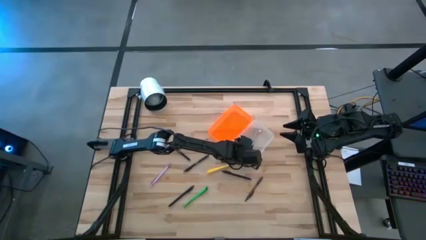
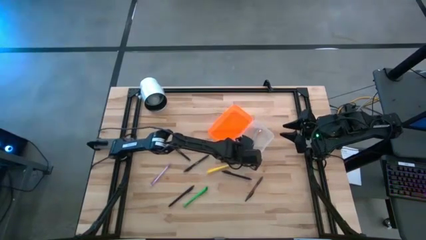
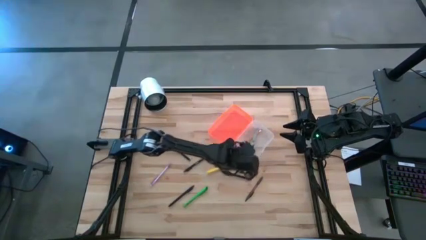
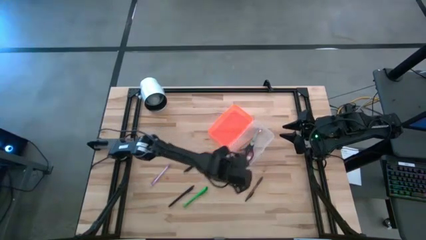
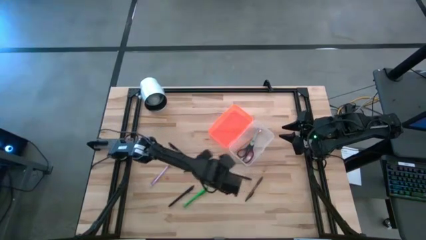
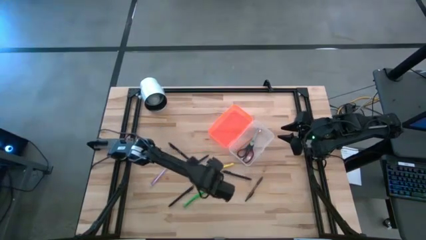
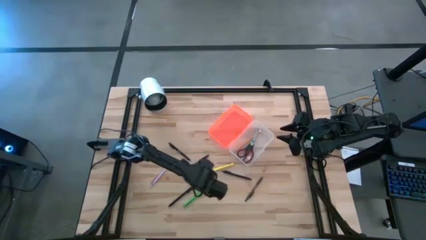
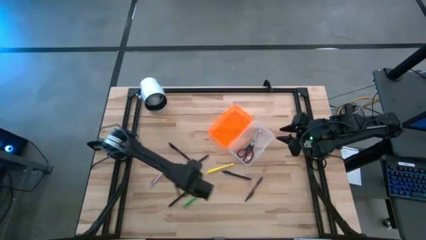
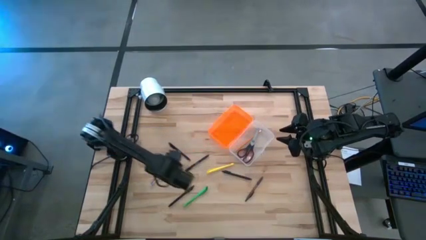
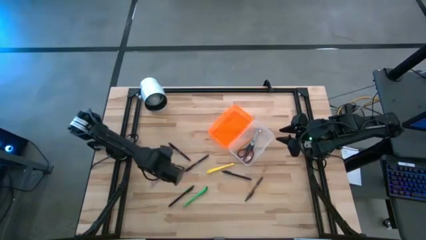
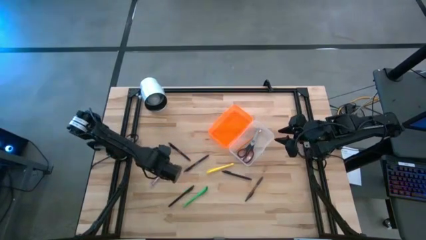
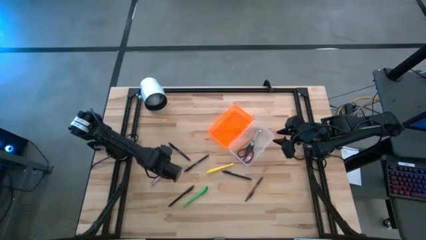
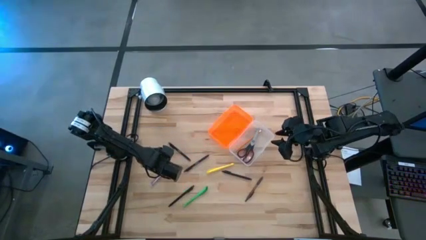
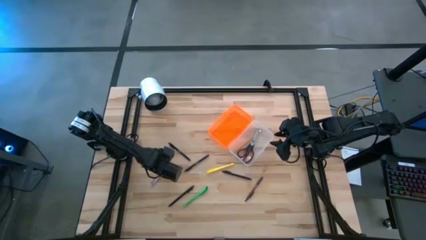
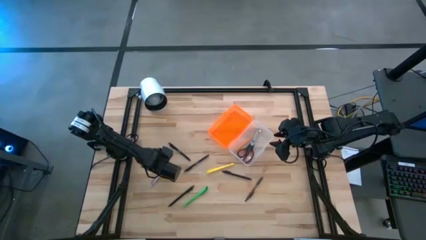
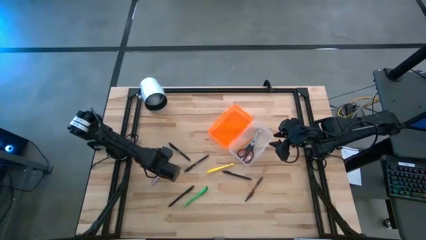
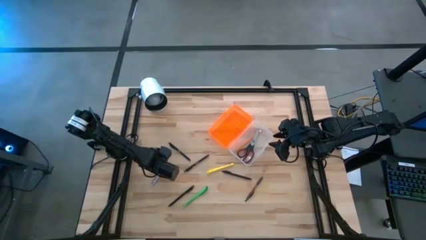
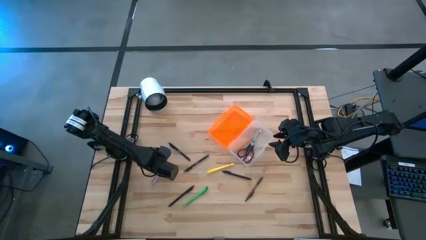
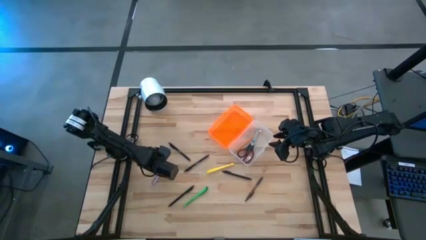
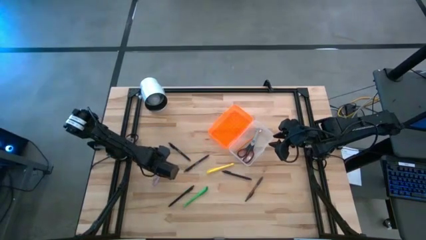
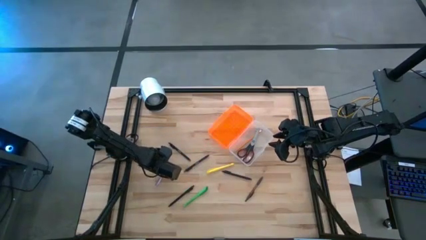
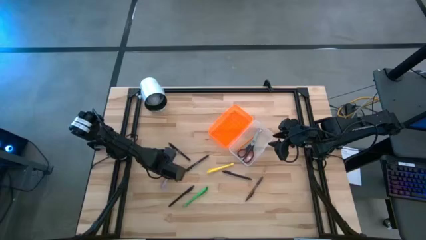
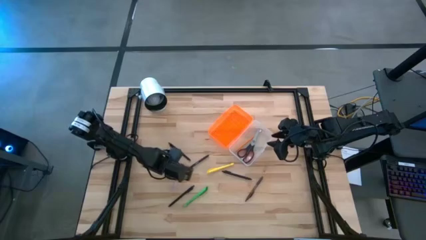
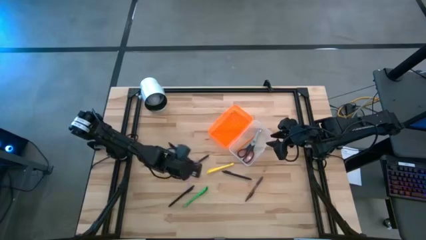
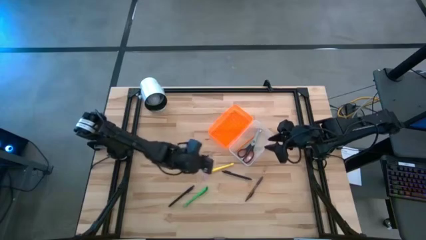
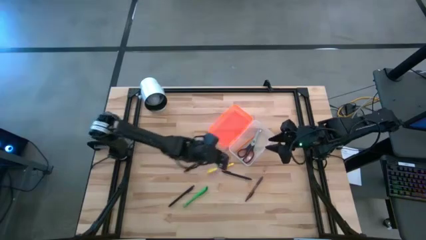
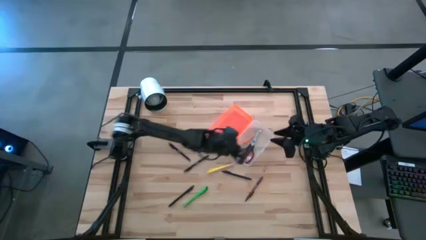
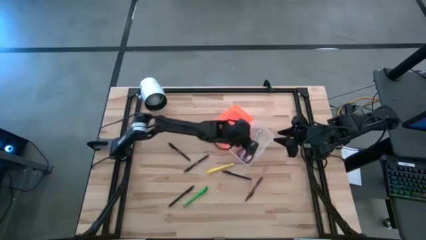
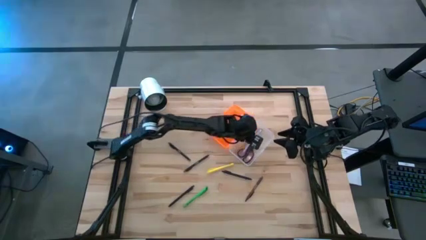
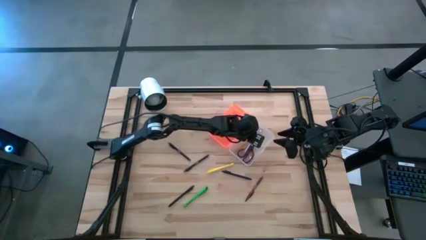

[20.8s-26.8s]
Task: Pick & place school supplies into a supply box
Put the purple pen into the orange supply box

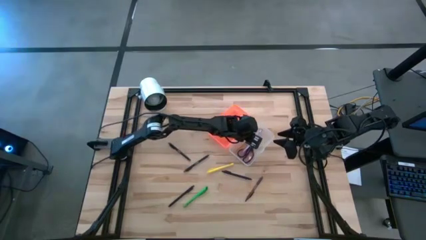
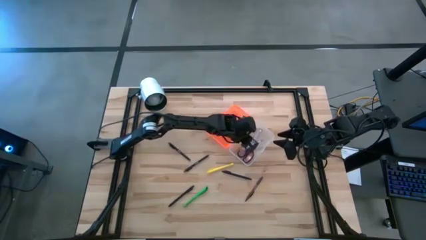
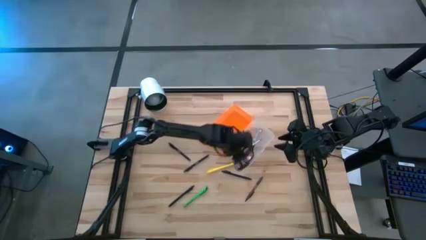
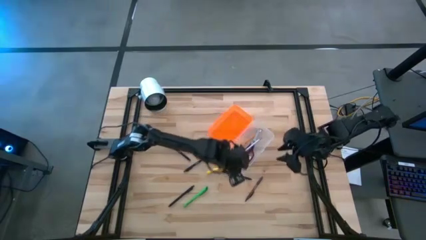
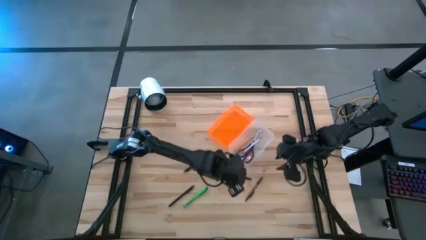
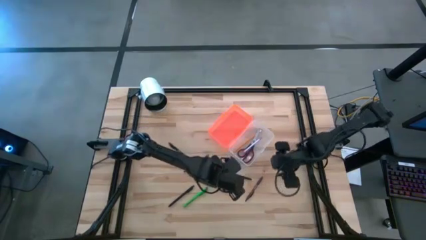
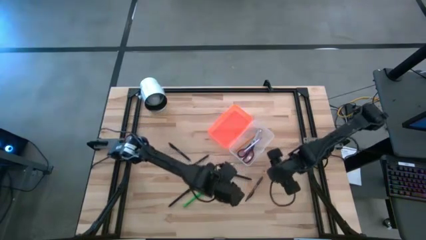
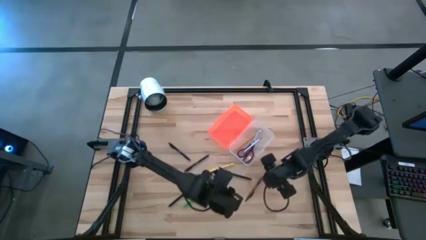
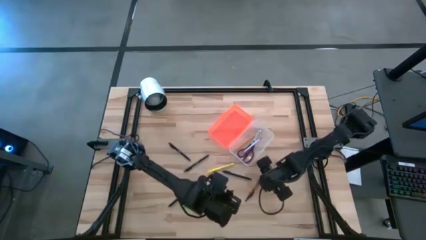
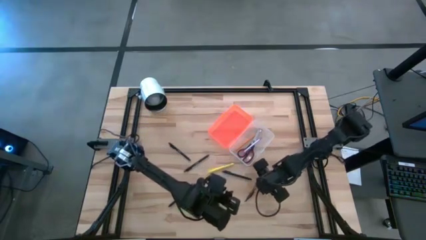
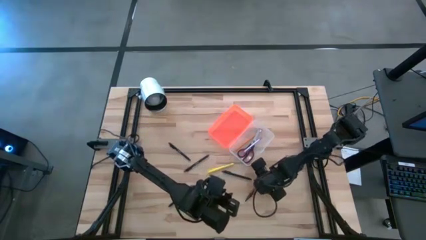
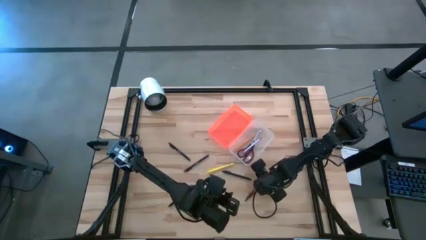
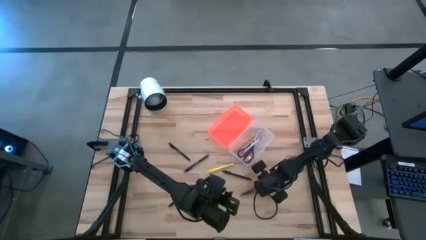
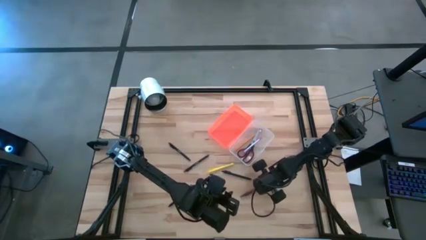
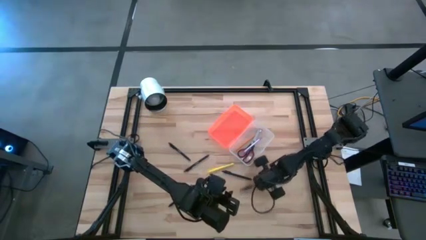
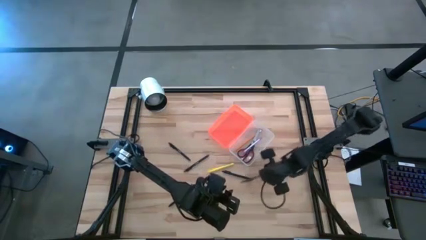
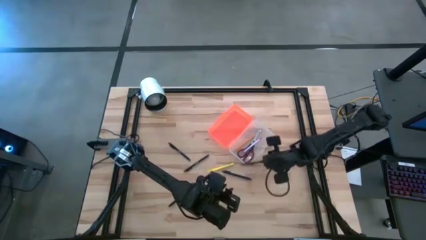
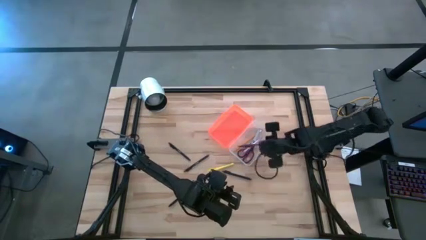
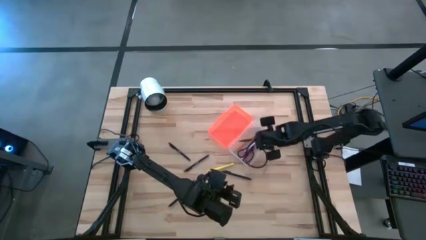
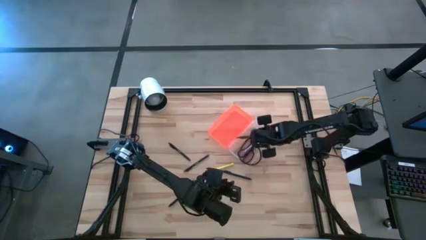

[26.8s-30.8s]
Put the brown pen into the orange supply box

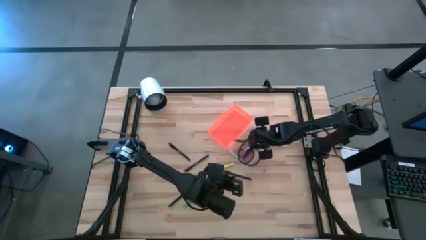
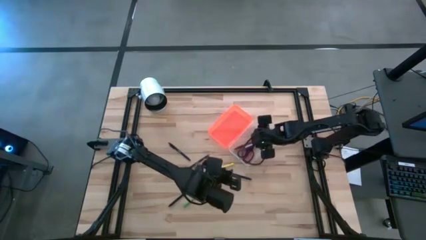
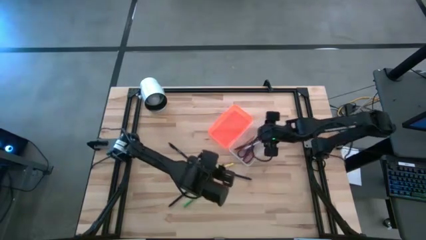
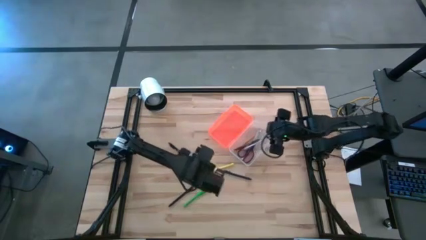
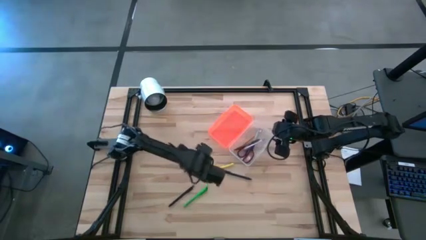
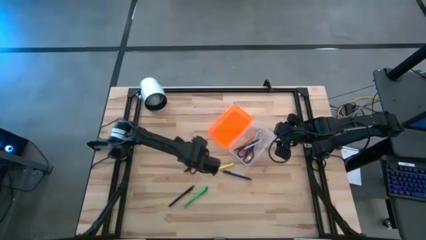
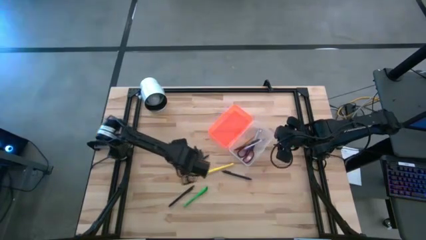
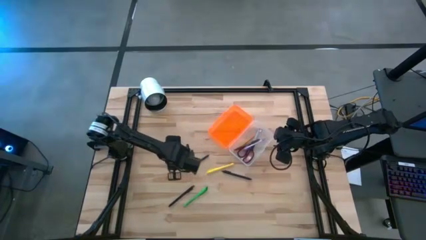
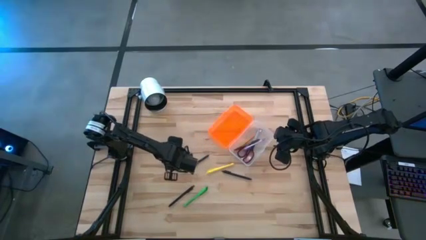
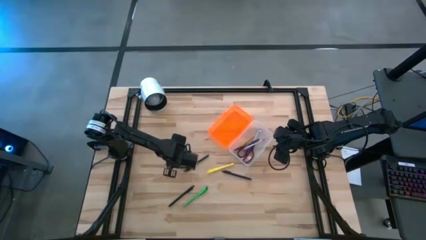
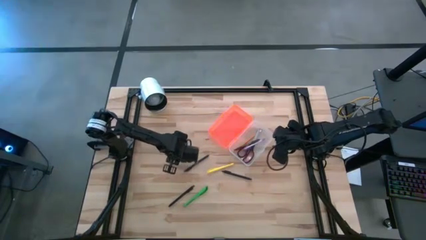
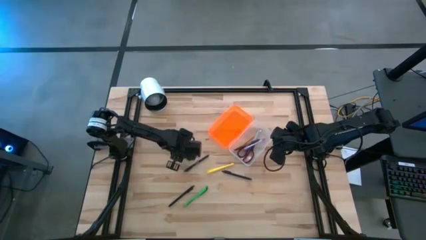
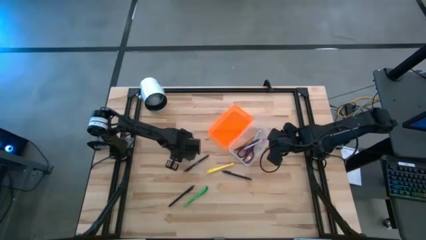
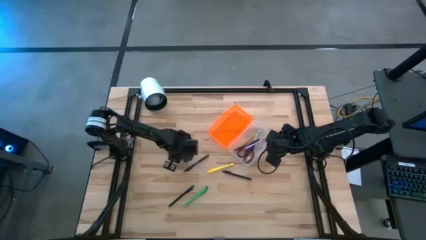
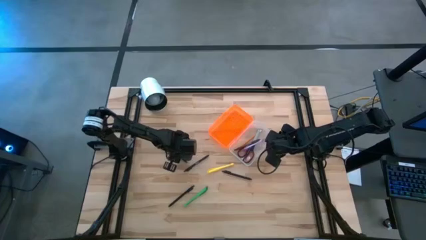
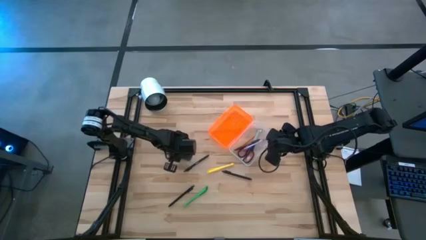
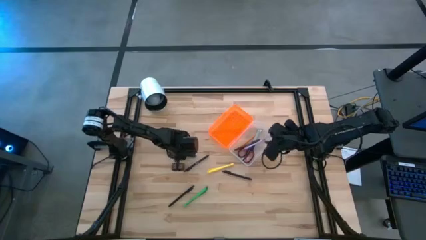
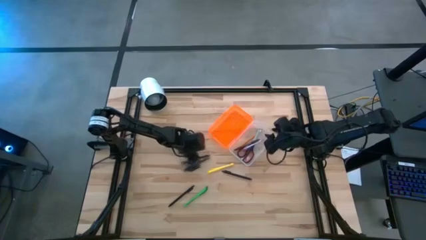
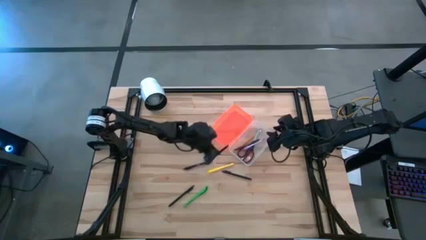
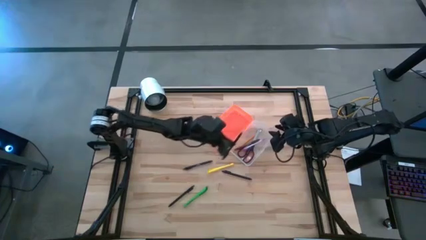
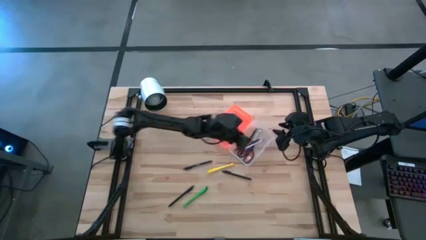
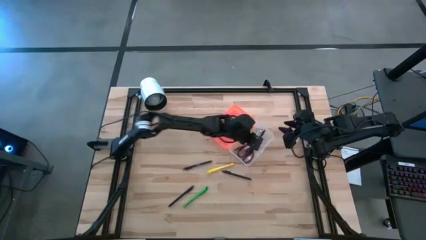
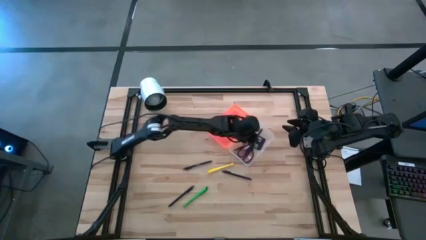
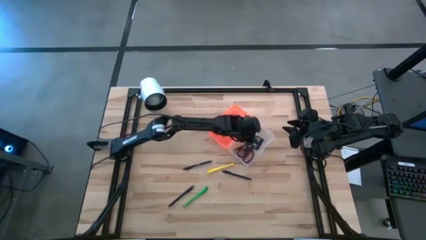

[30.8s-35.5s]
Put the black pen into the orange supply box

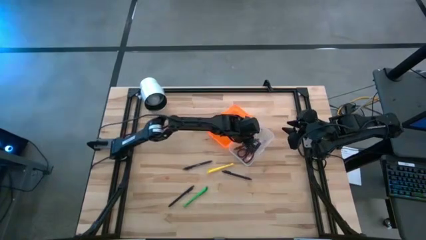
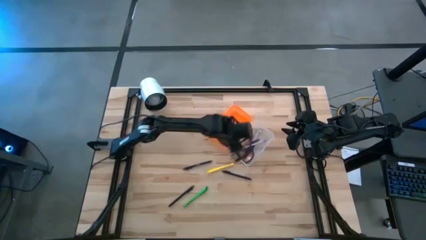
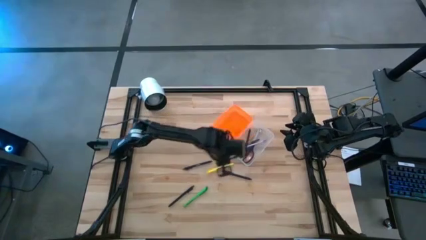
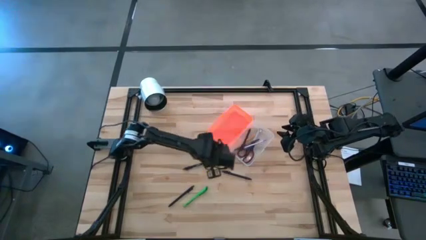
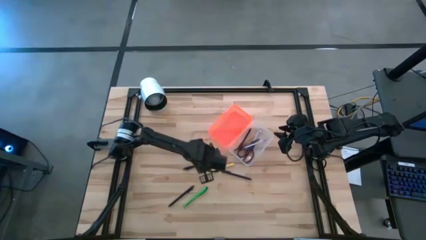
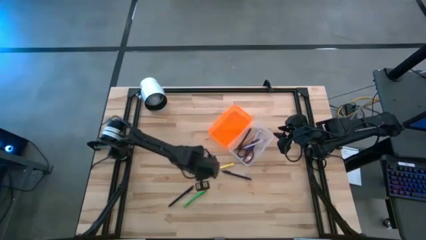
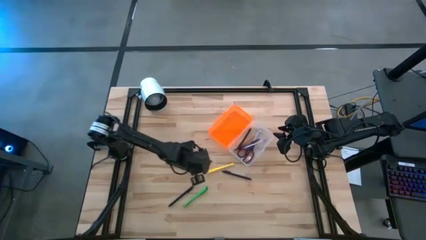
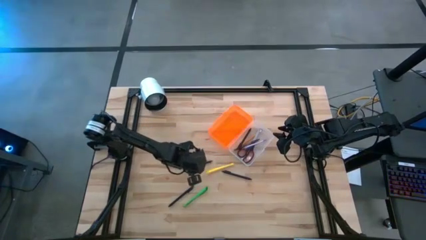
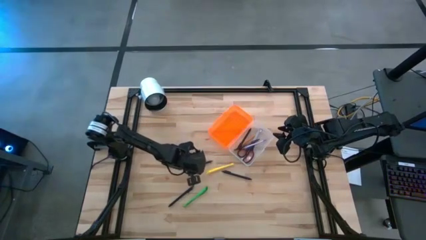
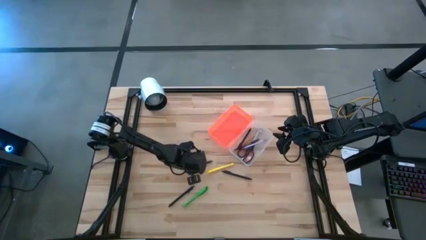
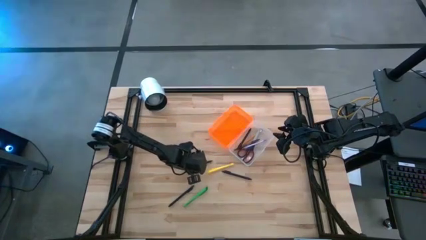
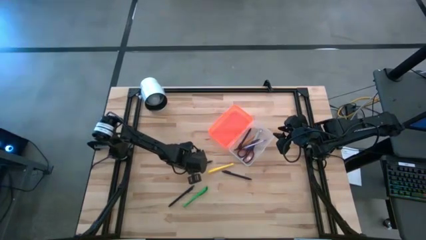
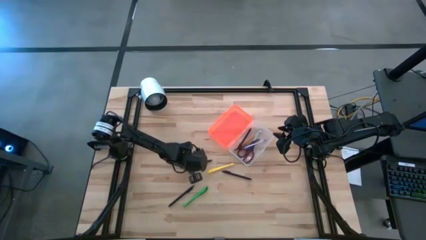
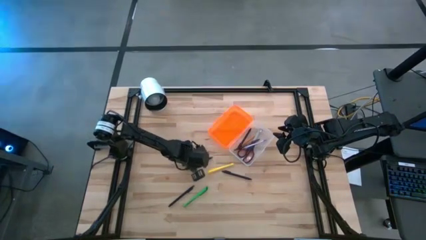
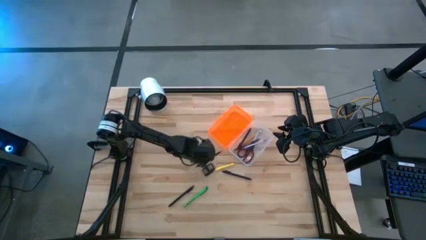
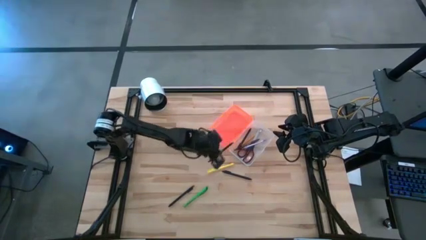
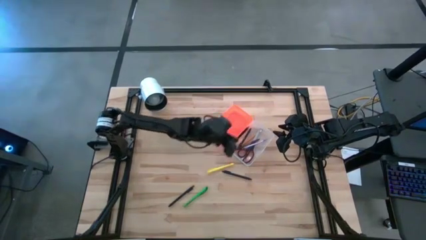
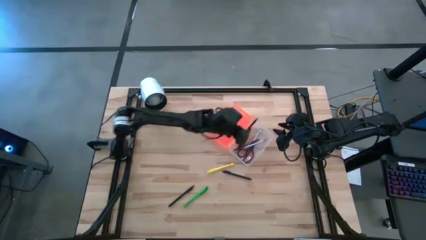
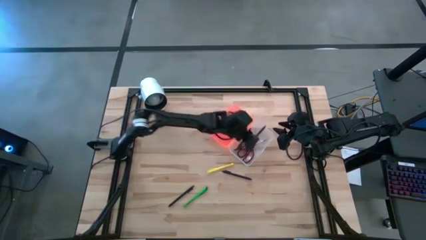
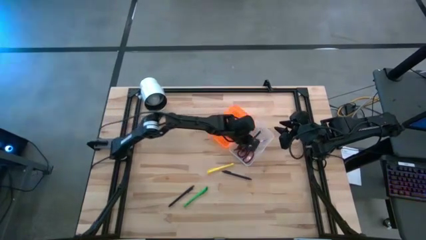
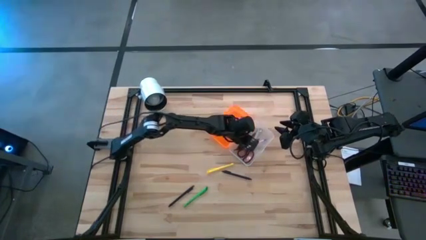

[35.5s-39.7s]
Put the black pen into the orange supply box
